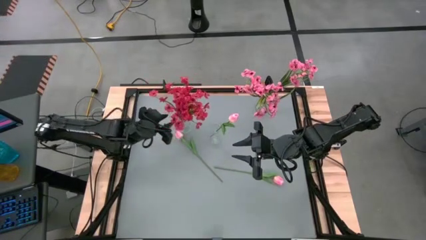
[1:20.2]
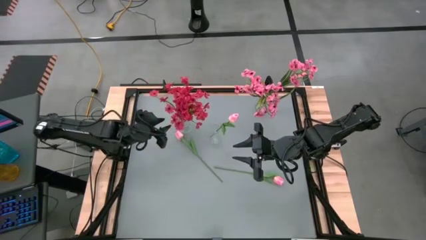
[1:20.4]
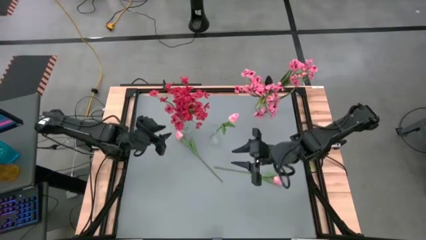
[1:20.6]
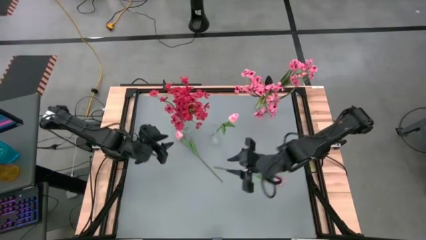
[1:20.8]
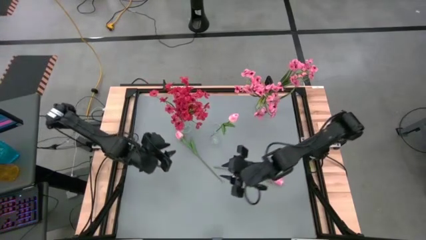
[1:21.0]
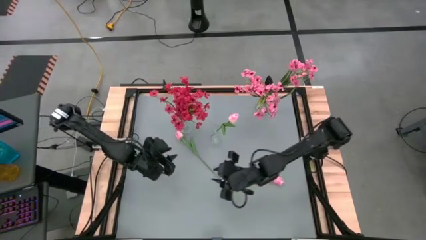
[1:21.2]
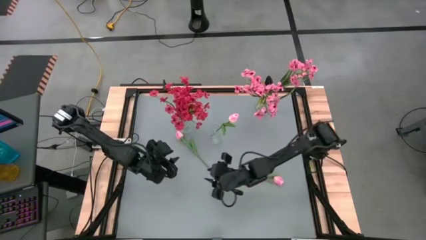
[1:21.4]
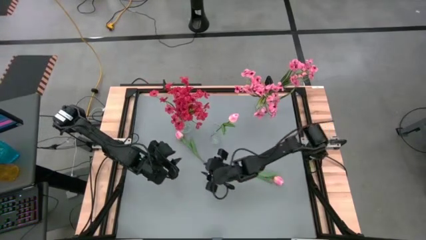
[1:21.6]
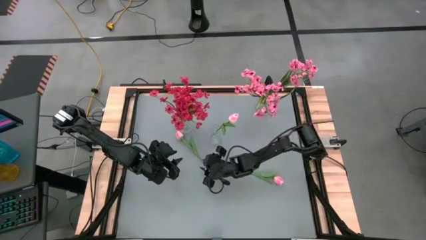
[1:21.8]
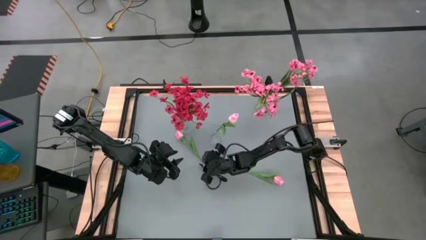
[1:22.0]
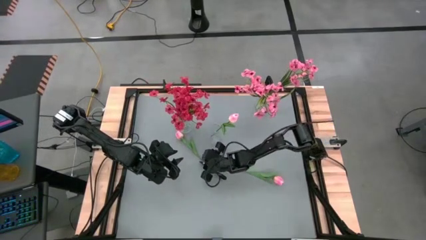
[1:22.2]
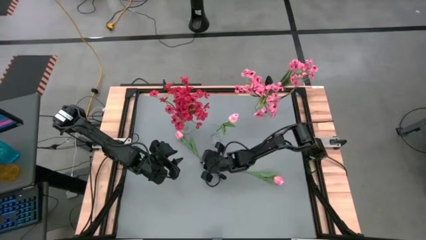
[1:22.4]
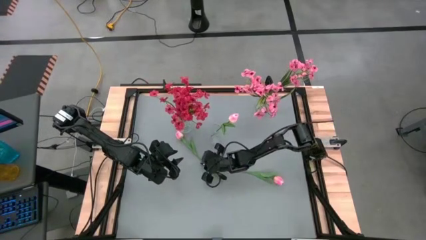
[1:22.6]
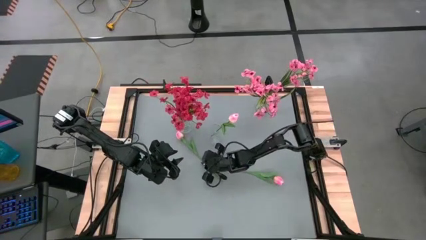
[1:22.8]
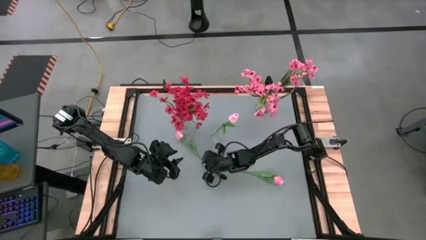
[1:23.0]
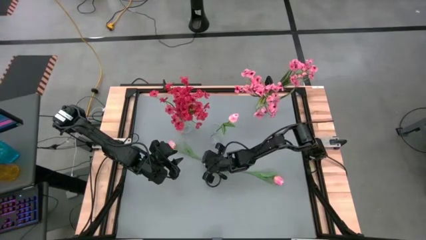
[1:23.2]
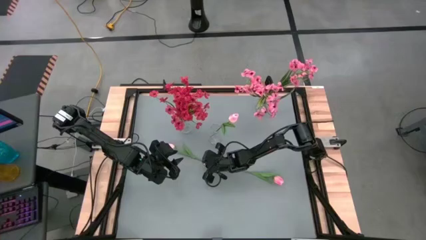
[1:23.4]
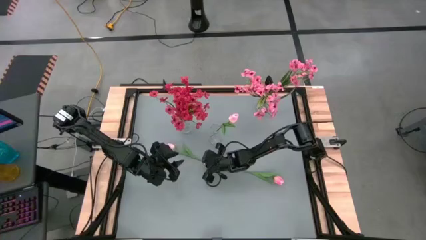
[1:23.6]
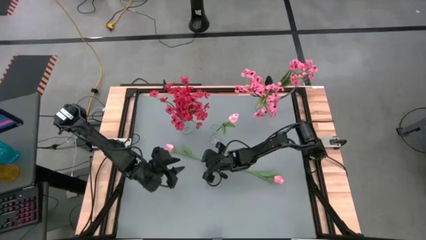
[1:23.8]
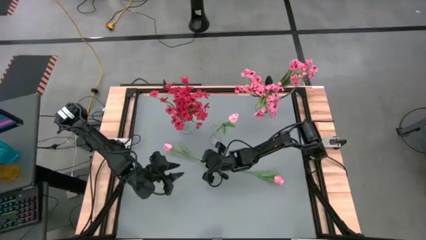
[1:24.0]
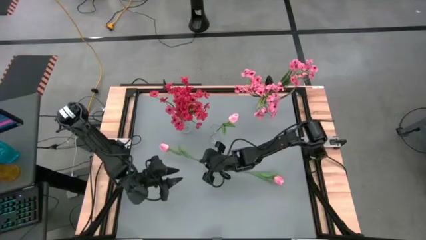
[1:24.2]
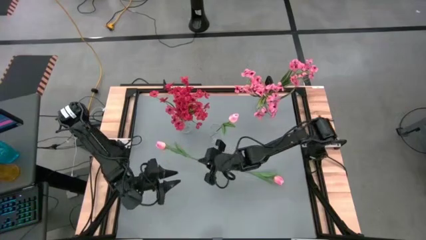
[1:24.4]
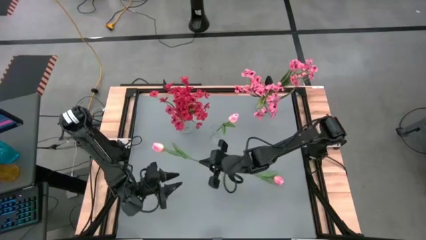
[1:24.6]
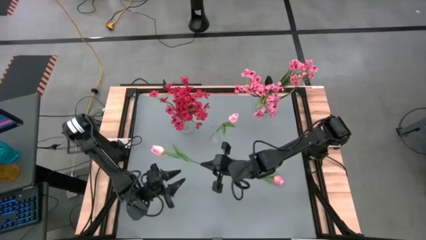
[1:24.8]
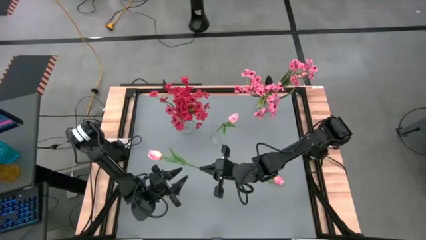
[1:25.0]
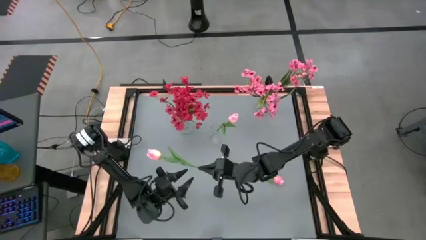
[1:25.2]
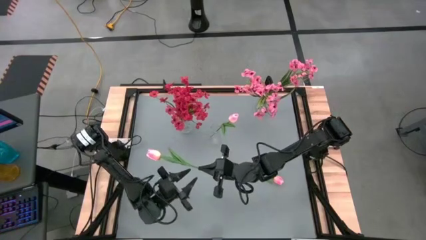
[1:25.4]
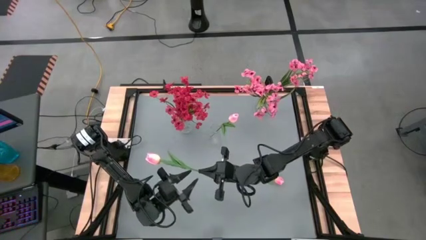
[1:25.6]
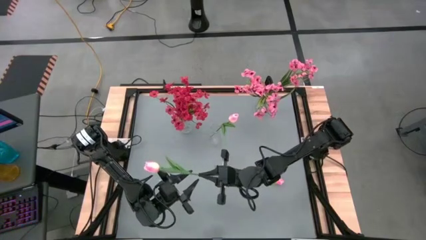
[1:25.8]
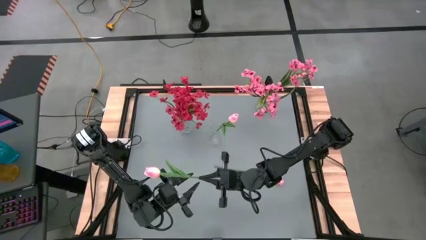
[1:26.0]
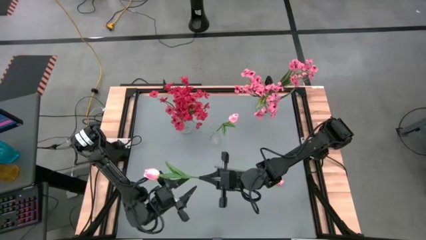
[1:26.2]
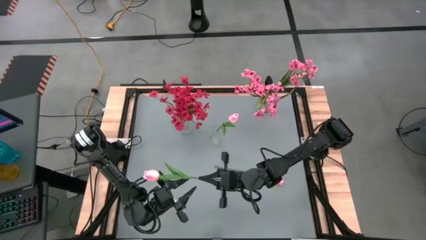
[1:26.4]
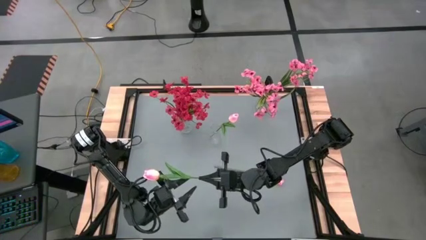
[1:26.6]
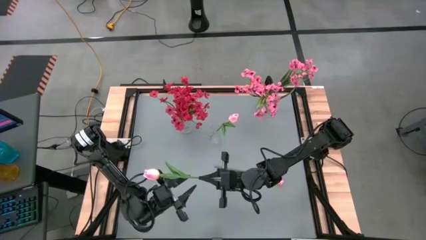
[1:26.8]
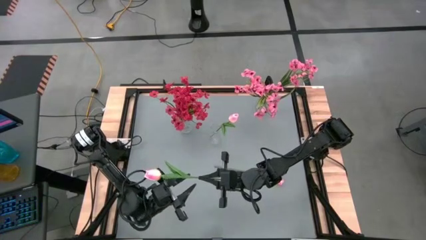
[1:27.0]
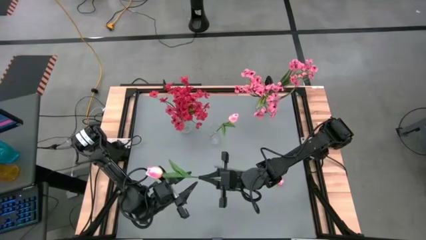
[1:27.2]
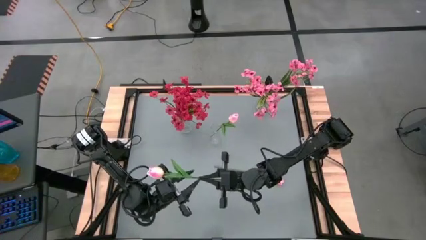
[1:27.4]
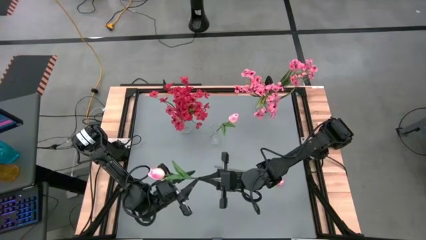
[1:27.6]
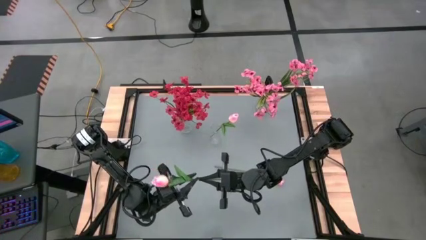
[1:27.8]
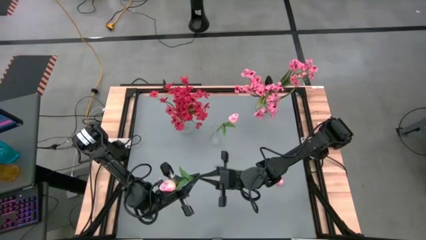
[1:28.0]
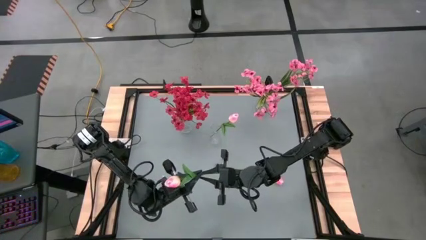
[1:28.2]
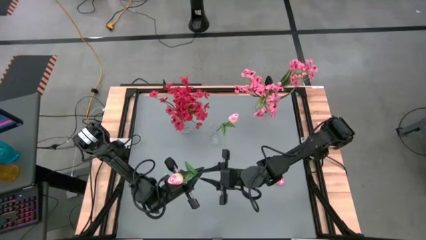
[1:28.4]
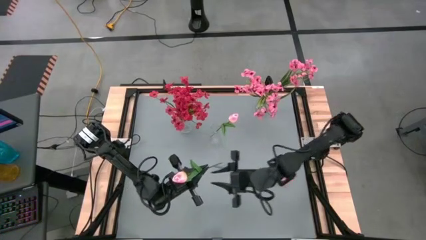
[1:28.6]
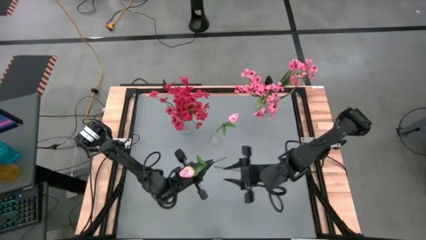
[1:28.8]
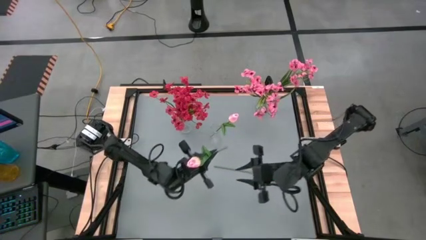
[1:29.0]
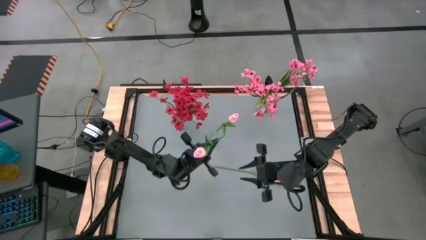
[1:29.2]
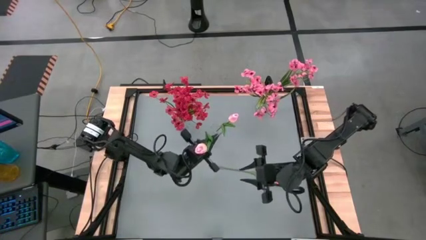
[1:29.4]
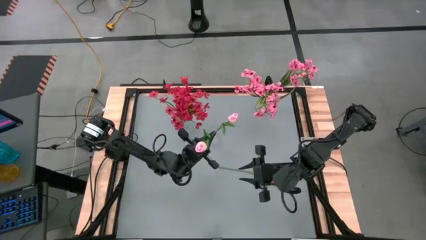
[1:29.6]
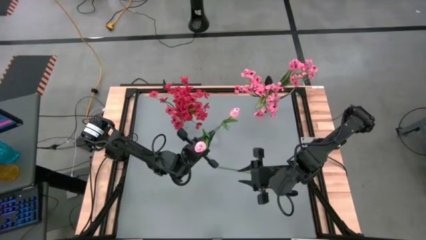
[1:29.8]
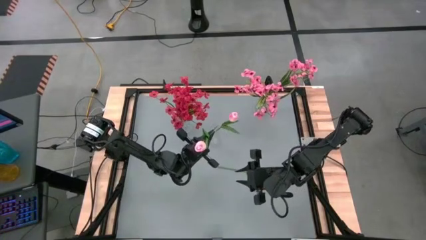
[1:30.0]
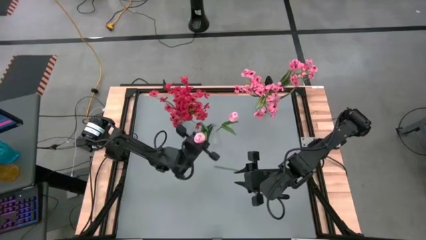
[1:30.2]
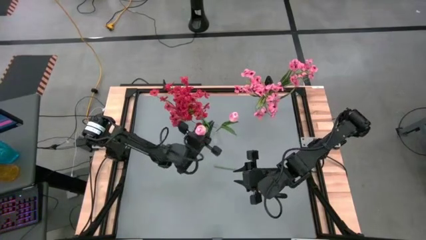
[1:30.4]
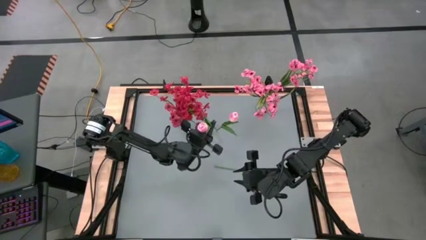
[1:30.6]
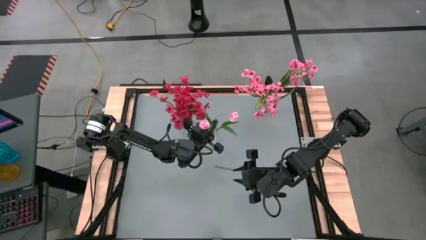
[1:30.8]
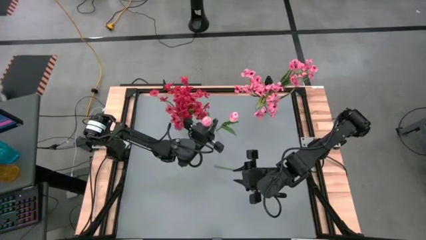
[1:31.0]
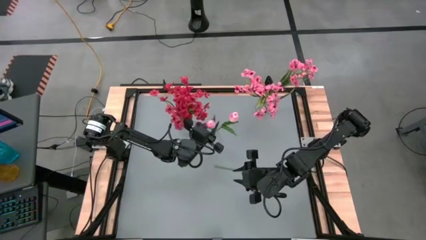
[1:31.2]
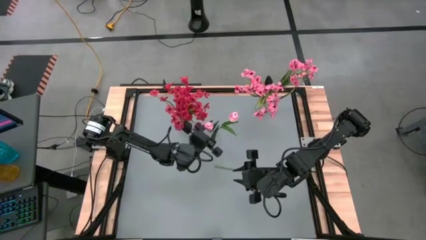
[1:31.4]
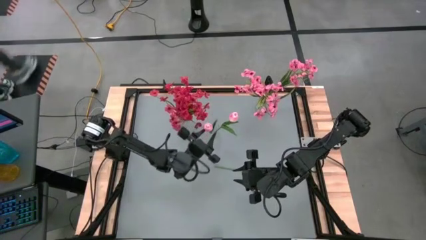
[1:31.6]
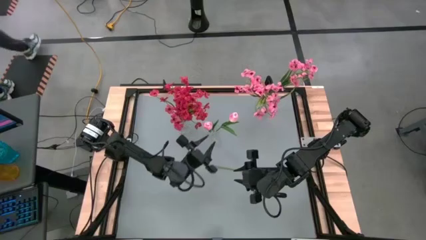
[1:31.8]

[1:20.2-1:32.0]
Task: Sort flowers into vase by color
Put the pink flower into the bottom transparent vase
